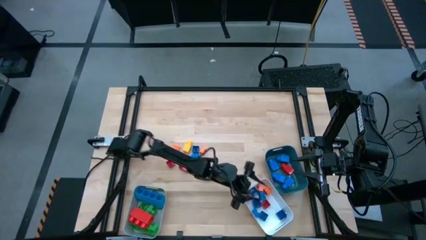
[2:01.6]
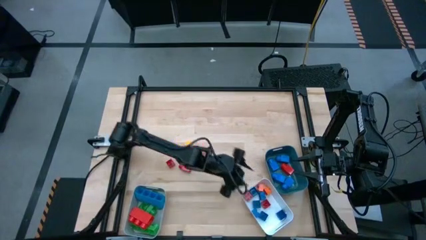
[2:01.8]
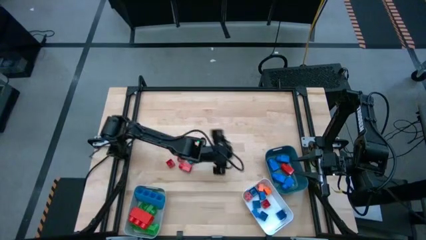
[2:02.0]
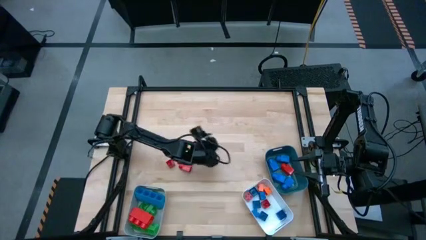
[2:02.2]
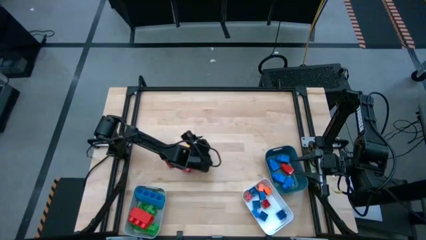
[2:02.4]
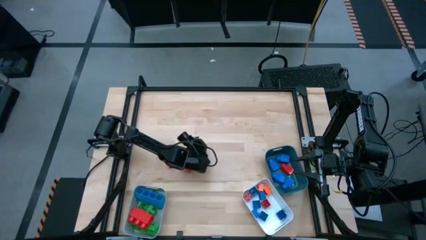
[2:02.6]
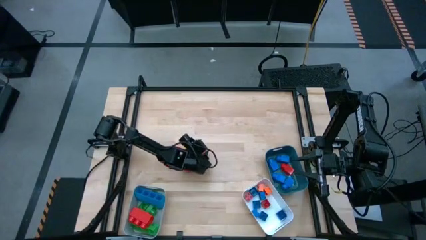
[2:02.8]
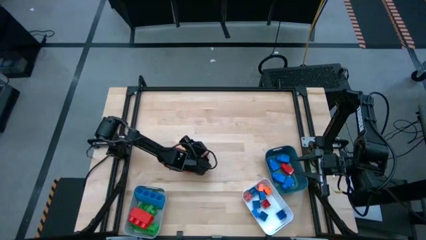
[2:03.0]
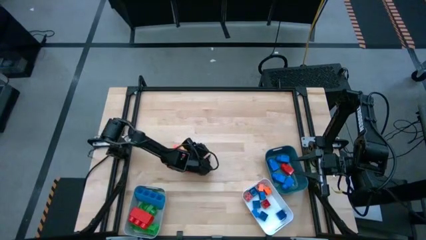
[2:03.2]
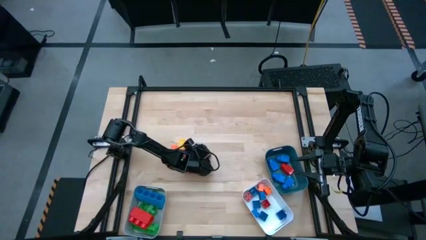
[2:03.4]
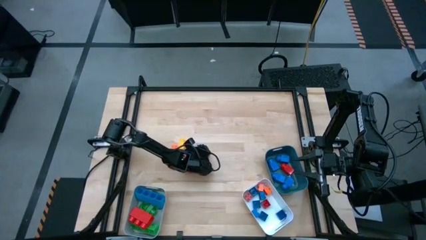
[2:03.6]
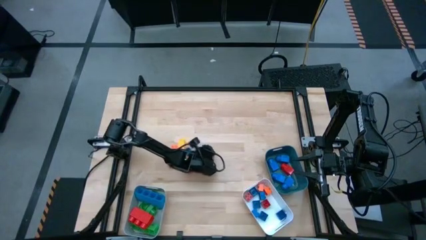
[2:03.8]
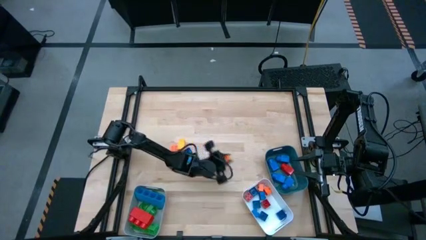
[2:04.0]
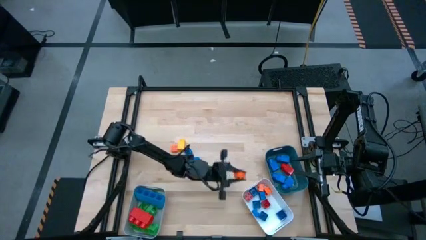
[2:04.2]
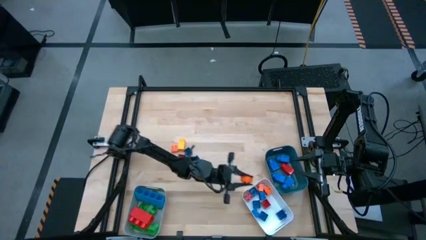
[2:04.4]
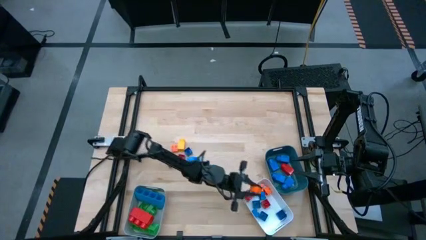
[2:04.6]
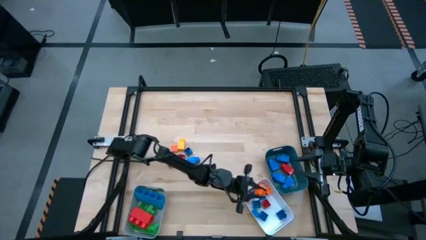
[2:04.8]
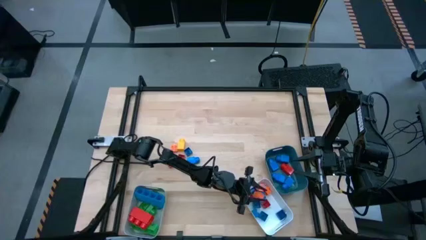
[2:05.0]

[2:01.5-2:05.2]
Task: Sort blocks by size
Put the small square orange game piece into the white bin

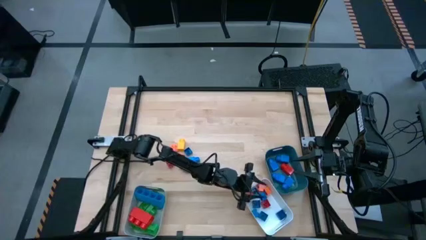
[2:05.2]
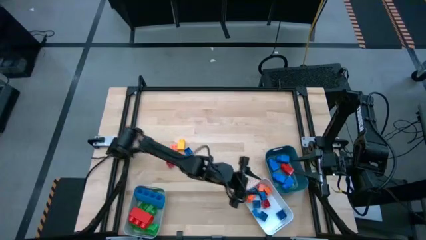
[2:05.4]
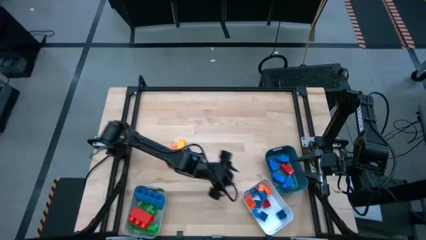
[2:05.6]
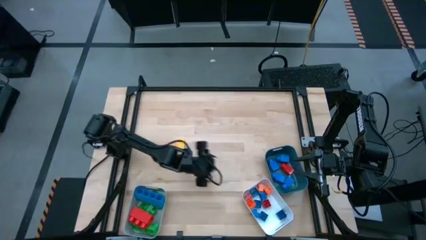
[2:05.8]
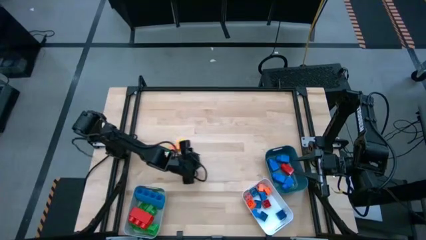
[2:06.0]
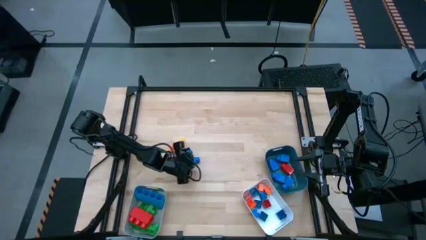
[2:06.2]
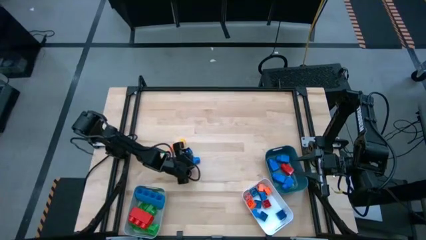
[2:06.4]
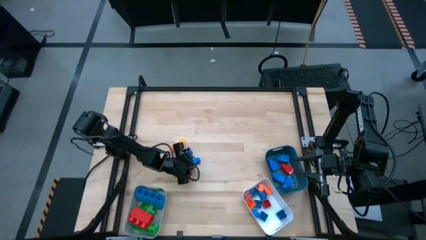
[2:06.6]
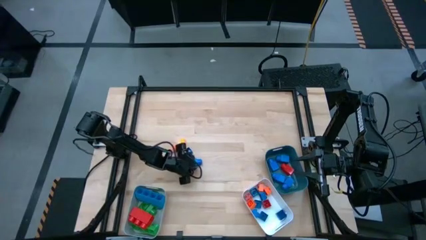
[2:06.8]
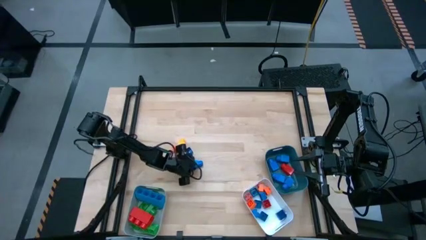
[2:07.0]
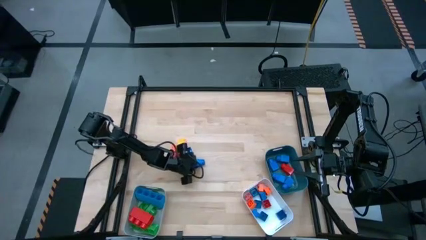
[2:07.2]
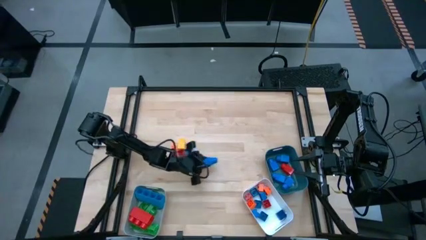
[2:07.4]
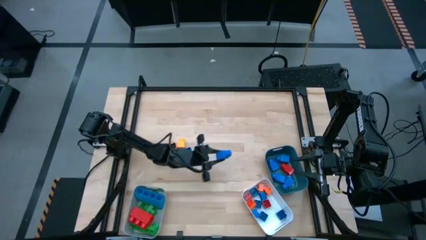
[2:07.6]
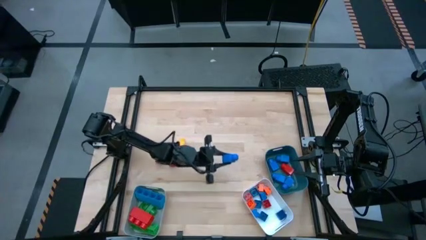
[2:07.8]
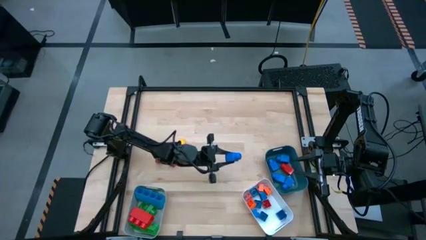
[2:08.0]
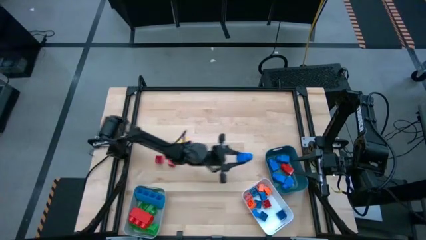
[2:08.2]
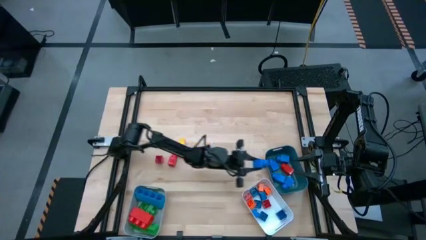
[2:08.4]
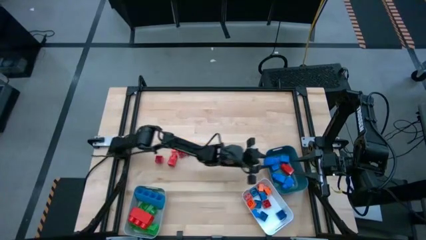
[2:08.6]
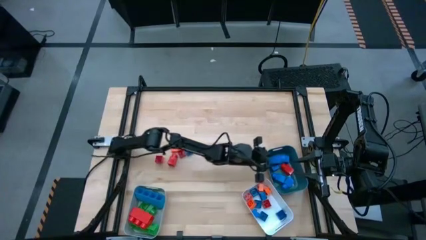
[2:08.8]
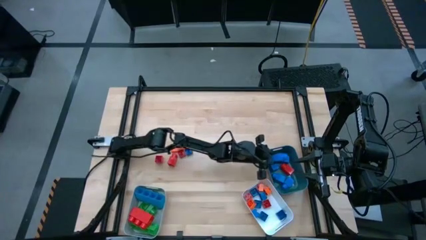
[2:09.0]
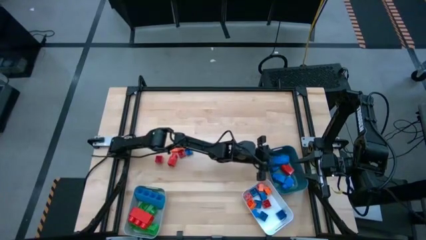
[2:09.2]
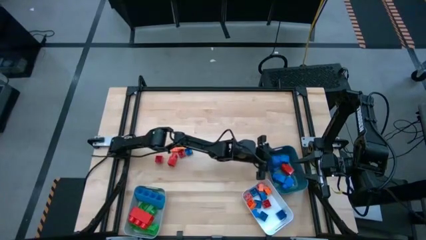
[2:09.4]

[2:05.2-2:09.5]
Put the big square blue game piece into the blue bin

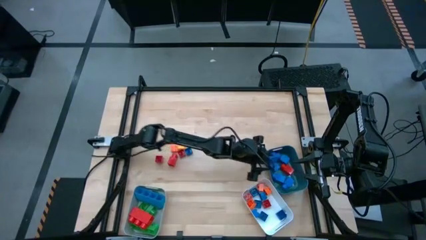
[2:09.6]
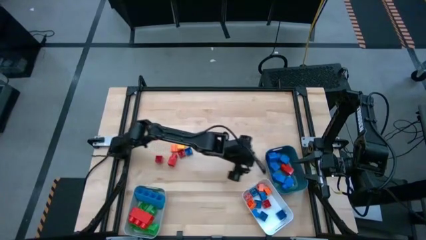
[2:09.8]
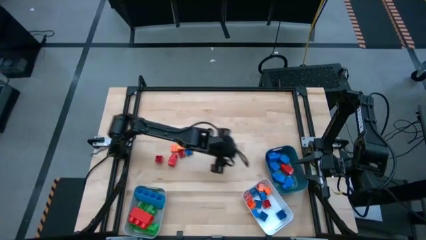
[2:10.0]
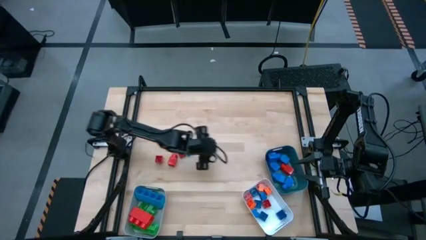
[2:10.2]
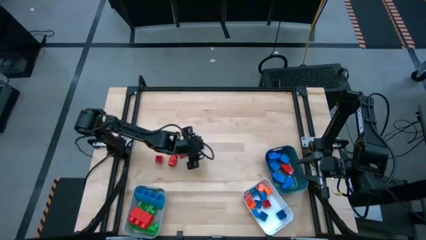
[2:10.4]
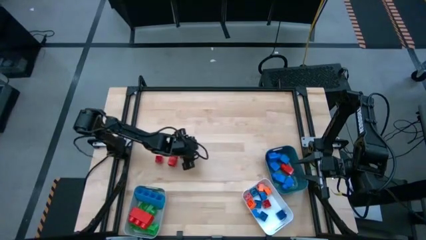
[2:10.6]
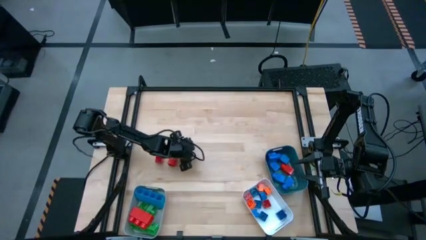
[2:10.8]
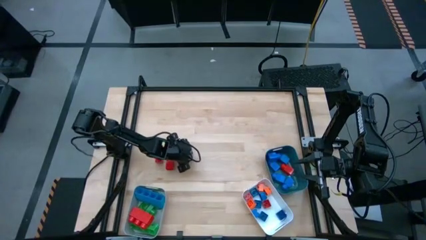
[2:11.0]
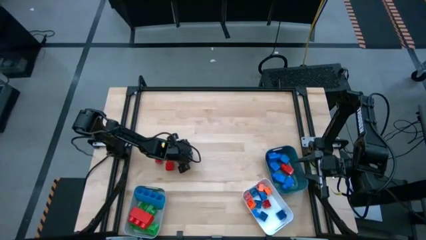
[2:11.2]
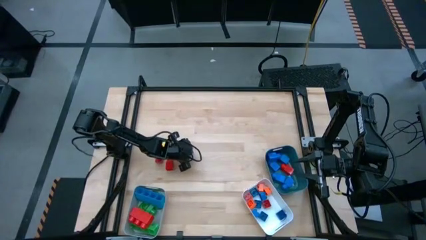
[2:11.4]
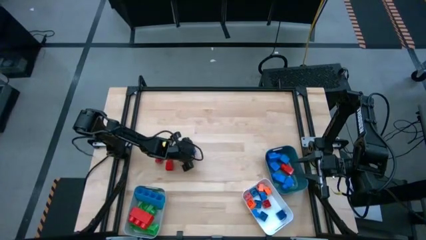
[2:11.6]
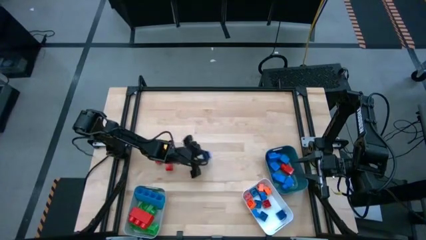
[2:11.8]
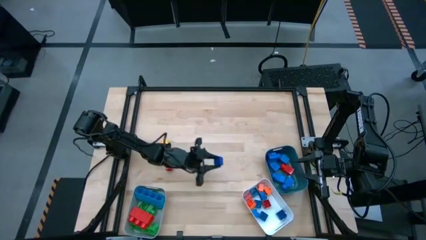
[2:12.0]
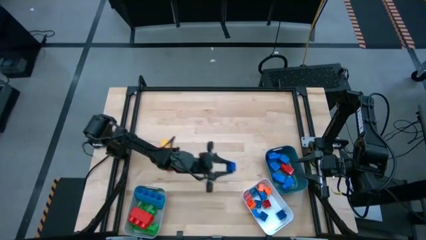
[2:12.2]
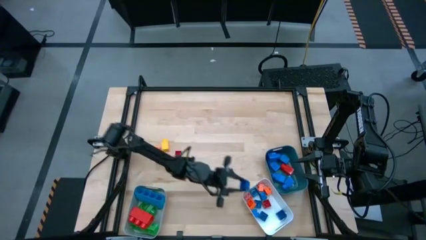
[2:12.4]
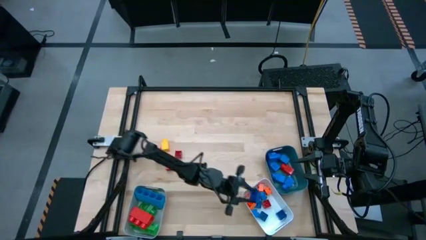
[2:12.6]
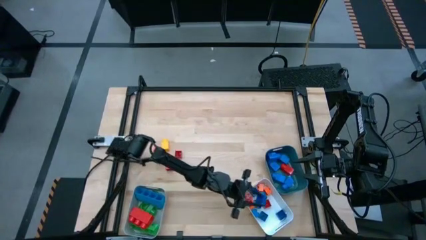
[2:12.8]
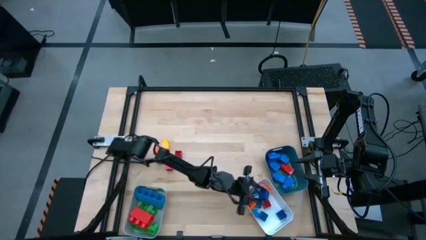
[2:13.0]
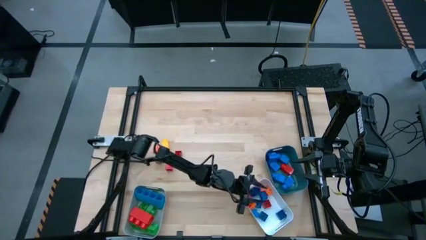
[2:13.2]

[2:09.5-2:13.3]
Put the small square blue game piece into the white bin

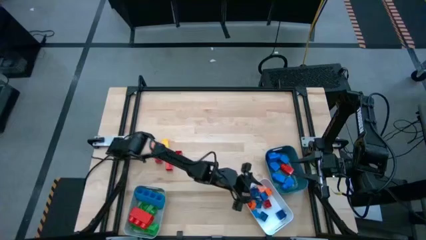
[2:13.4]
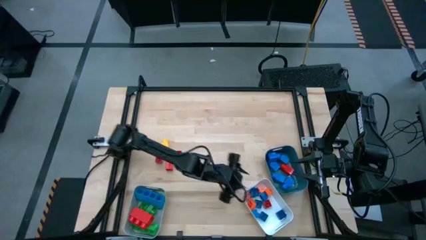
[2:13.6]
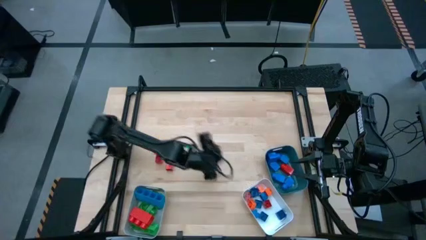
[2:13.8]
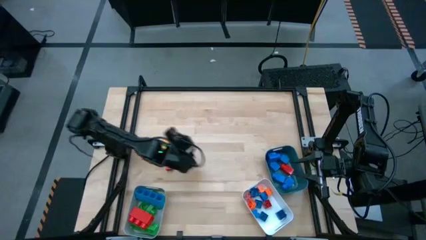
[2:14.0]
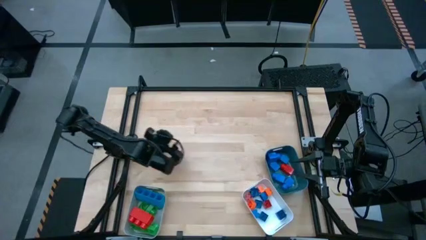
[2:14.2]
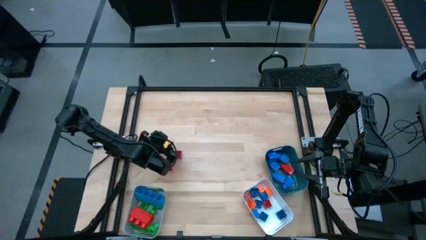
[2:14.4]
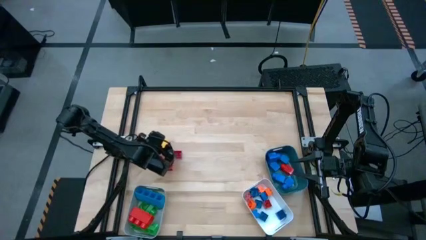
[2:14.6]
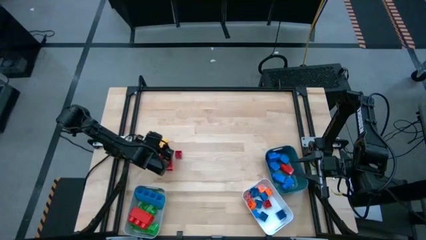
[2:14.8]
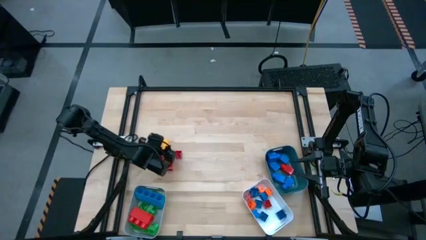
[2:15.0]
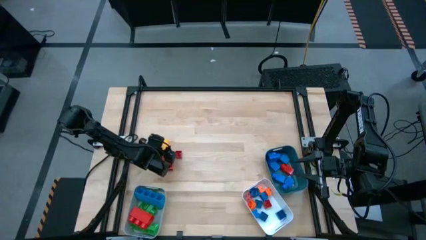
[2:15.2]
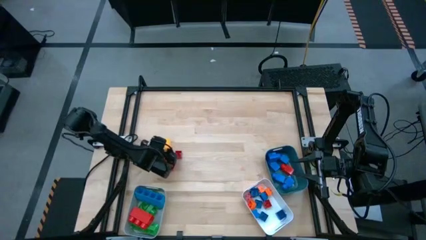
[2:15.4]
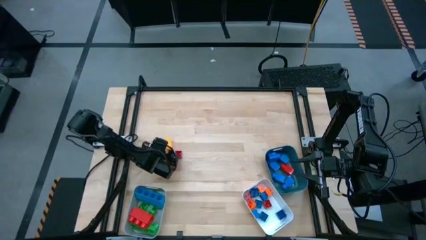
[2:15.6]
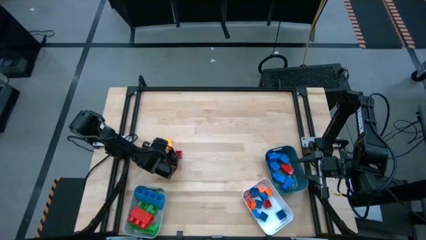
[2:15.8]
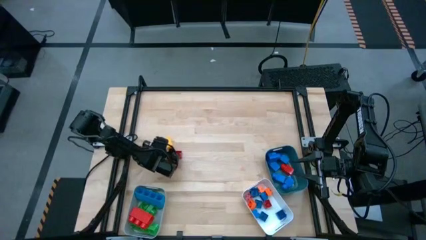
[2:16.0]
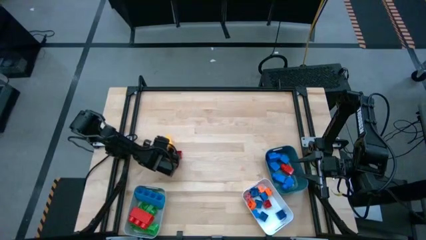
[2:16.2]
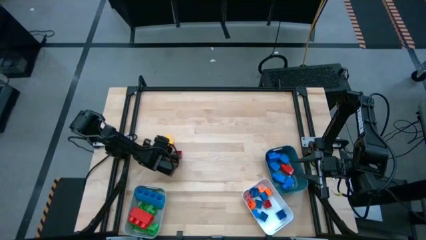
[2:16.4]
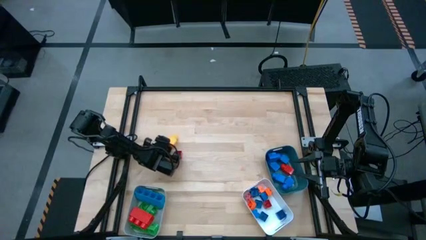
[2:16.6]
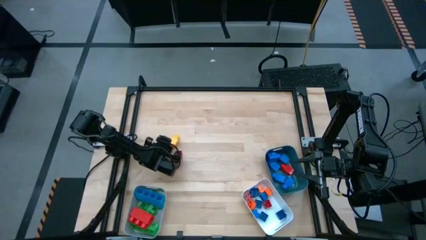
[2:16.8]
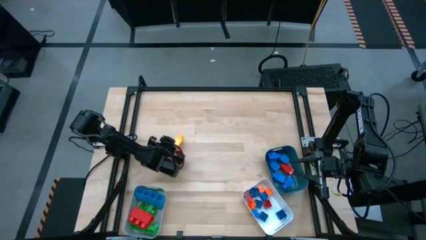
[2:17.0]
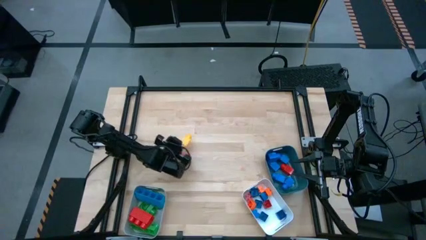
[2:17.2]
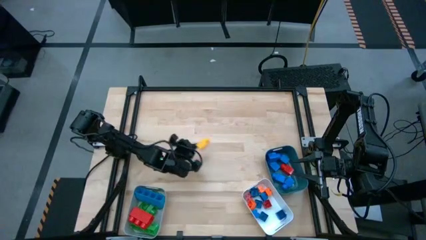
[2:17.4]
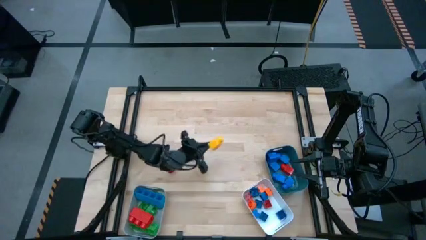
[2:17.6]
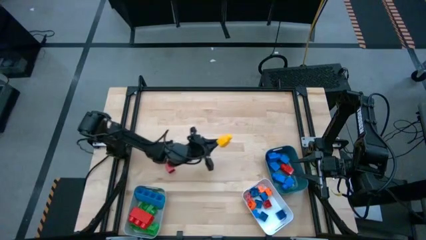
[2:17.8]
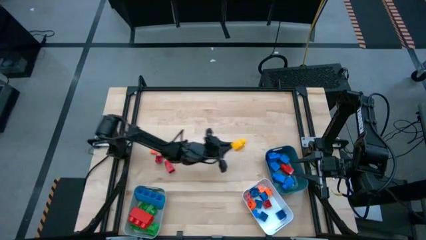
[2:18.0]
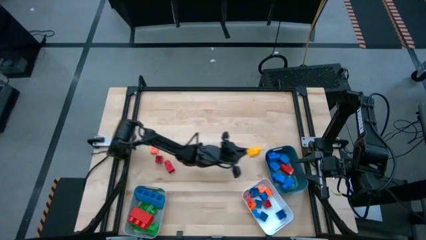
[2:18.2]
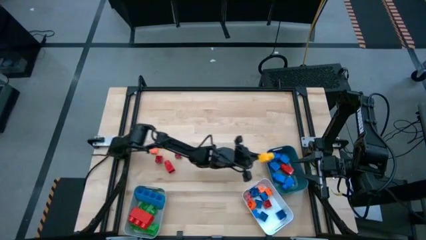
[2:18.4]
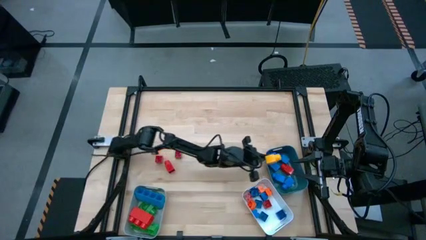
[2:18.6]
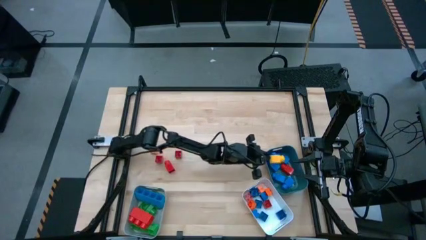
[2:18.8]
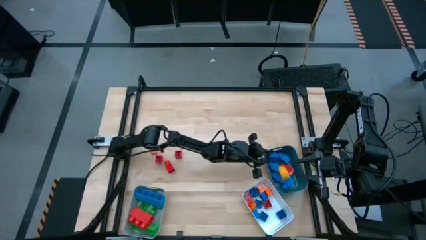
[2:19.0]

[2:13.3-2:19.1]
Put the big square yellow game piece into the blue bin
